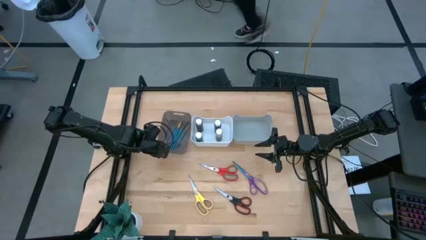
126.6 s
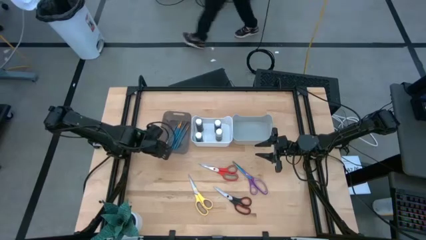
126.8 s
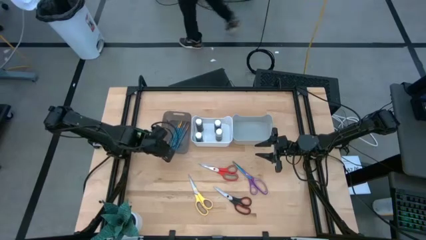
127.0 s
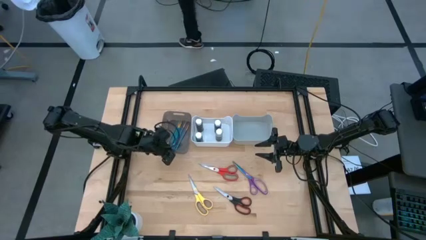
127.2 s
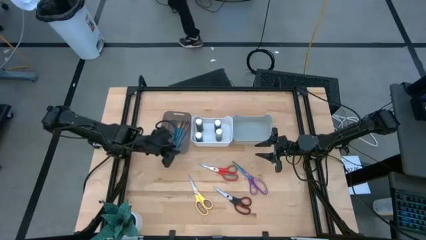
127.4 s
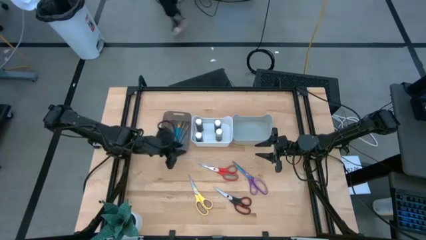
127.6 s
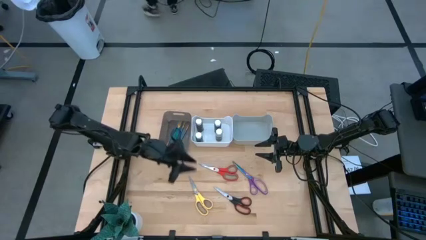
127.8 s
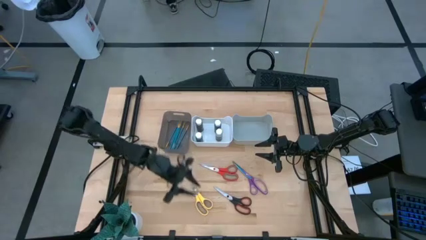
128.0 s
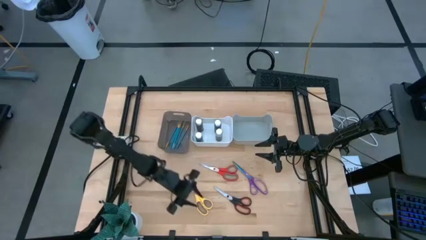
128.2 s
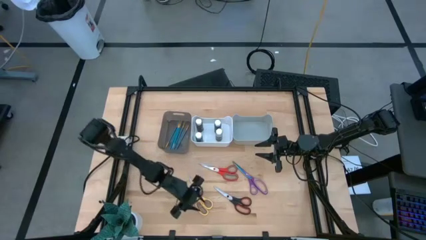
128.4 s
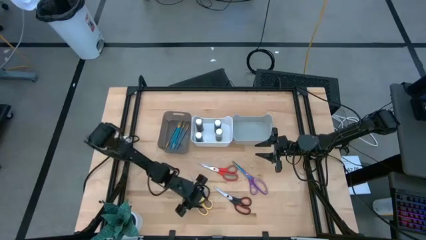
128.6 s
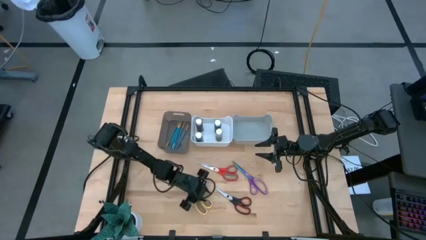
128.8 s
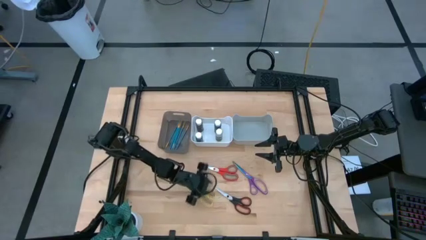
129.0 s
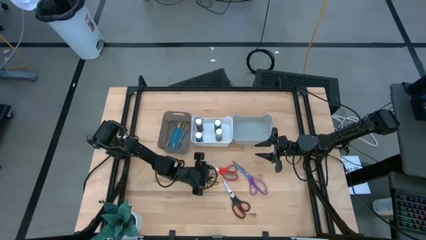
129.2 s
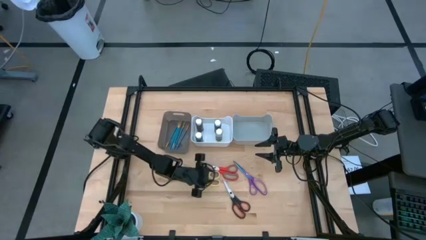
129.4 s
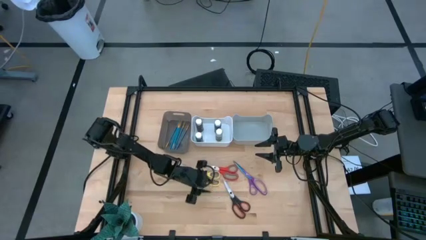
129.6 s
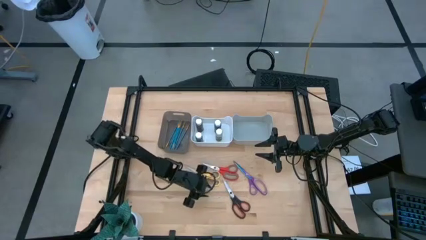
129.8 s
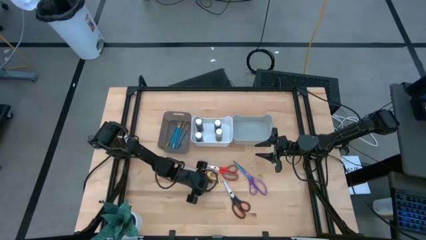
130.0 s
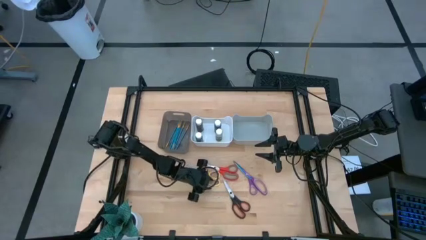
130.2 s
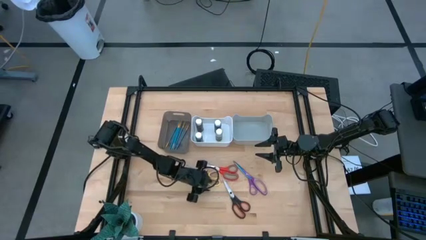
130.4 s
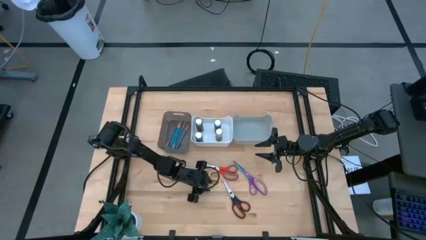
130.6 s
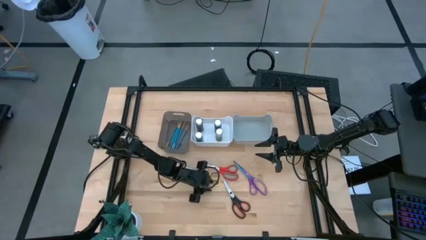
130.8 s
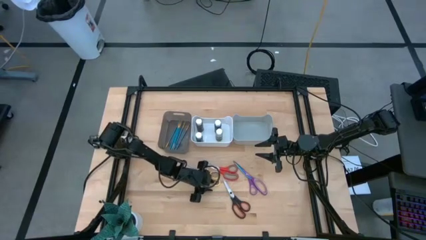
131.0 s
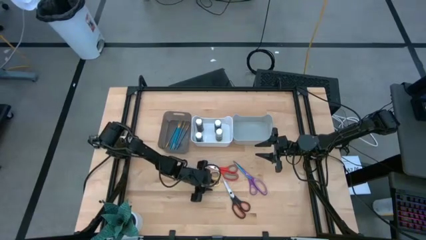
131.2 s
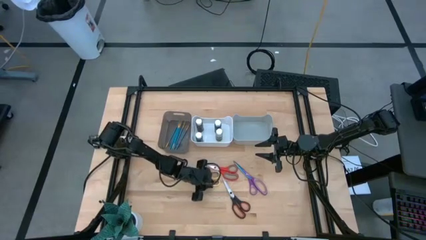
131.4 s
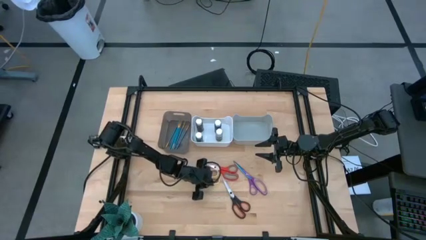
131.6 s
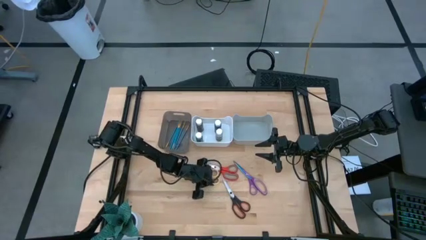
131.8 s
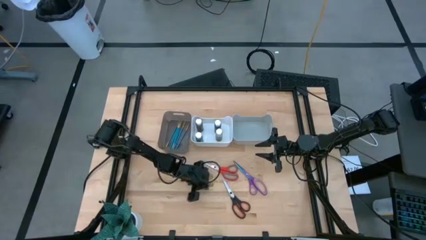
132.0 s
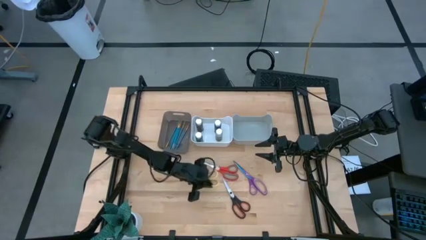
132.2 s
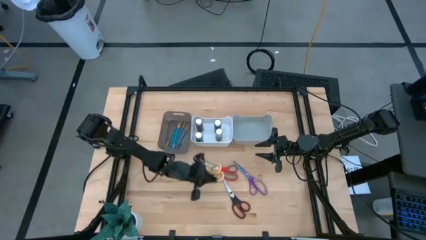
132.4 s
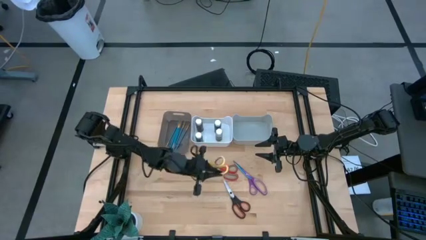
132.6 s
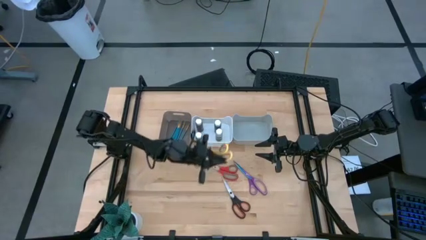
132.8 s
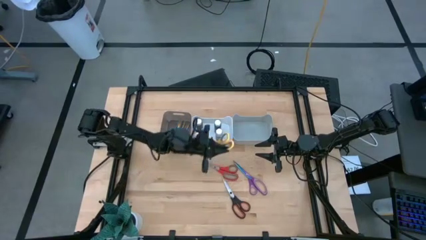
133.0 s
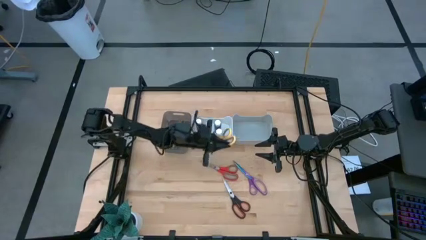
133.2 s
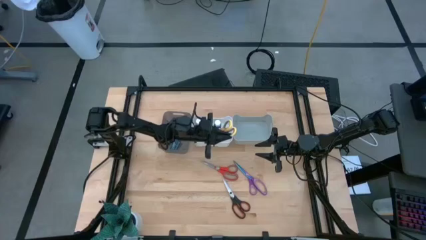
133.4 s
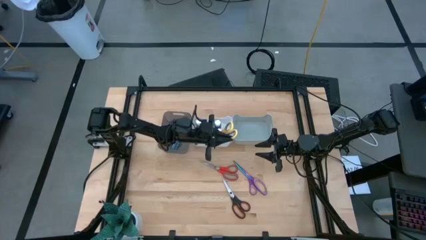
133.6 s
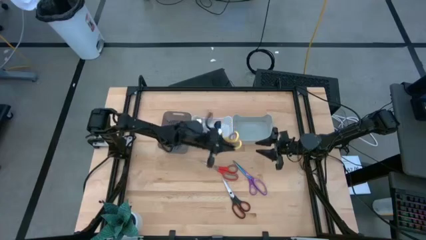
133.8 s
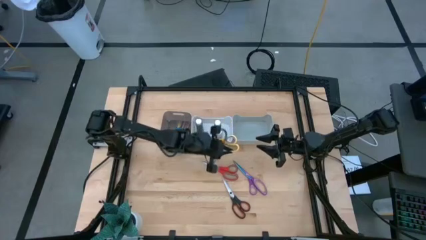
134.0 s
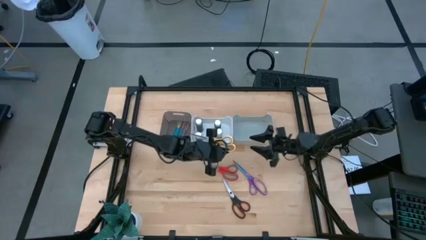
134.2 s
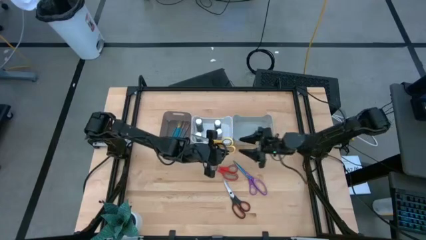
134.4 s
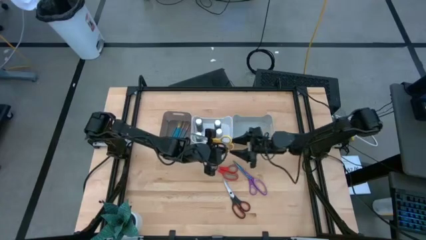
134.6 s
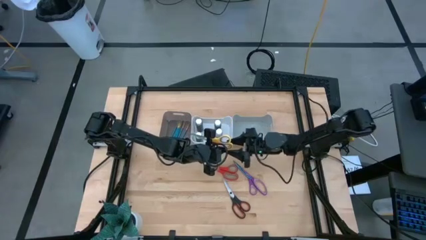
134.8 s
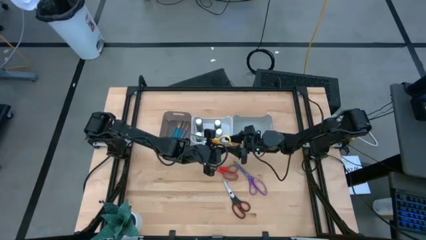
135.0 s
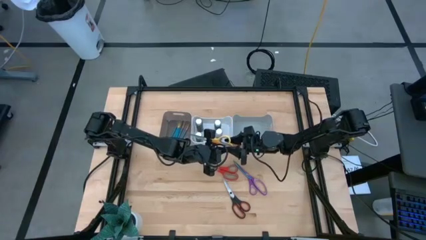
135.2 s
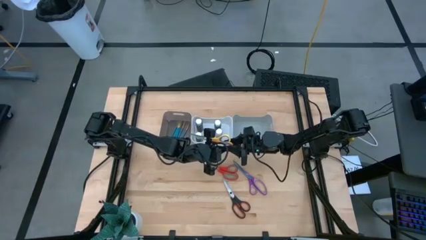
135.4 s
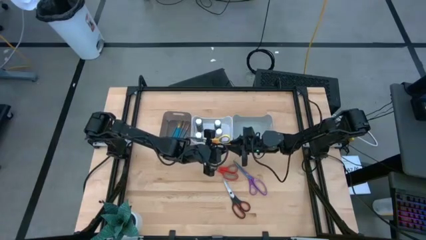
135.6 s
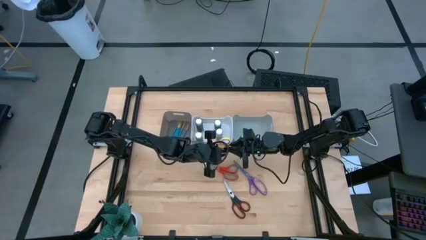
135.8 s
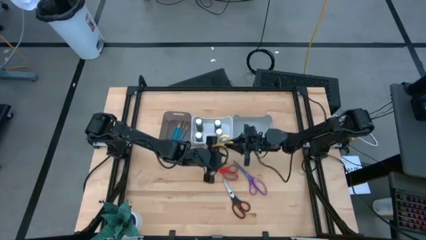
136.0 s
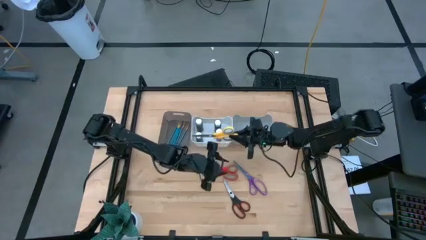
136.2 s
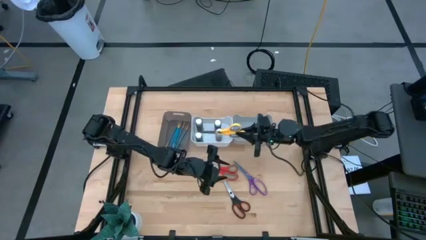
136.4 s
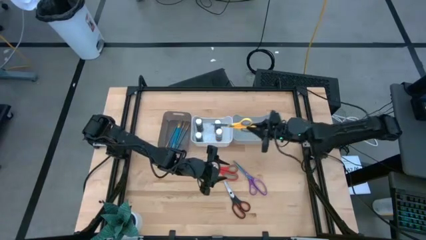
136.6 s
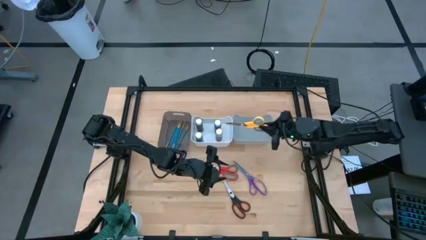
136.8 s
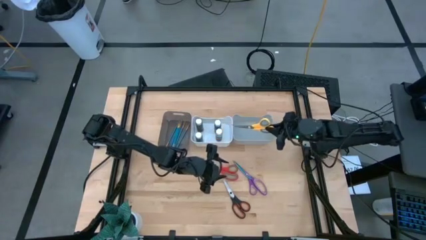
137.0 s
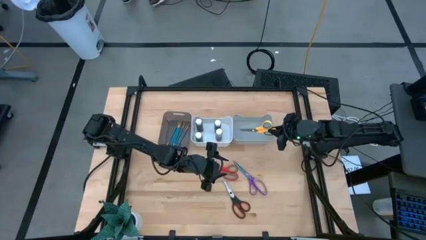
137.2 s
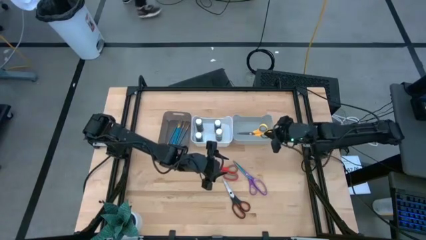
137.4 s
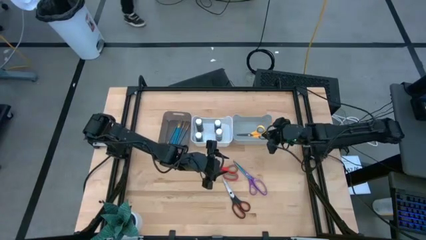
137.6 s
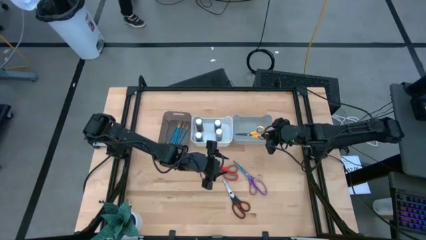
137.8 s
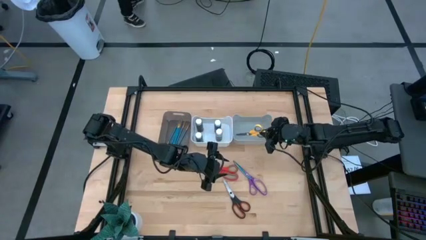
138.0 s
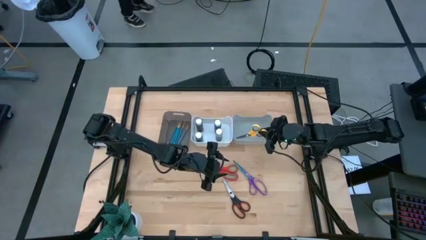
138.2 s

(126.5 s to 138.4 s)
Task: Pick & Place Paint Supplies
Put the yellow scissors into the gray bin

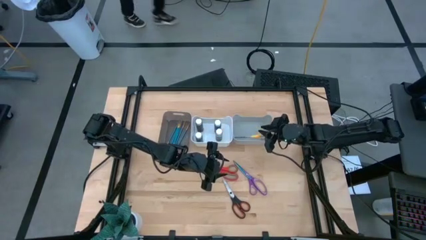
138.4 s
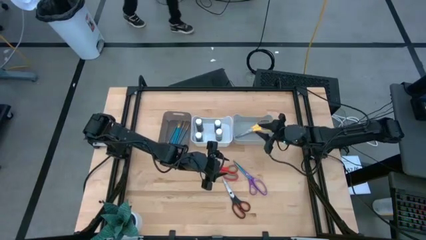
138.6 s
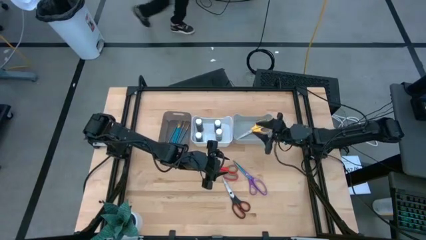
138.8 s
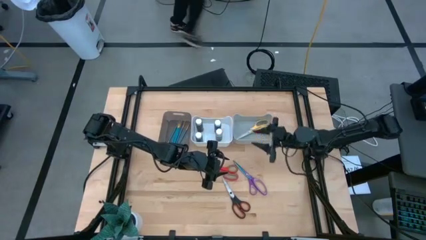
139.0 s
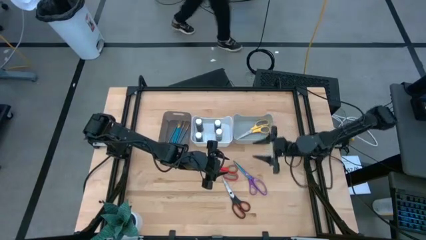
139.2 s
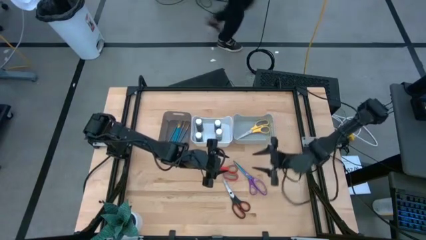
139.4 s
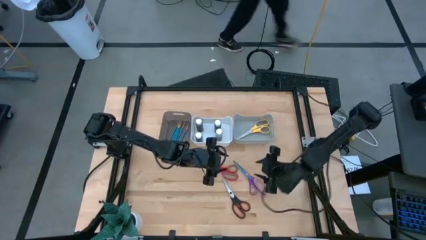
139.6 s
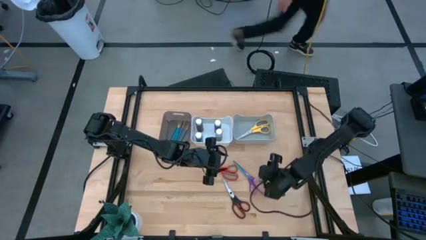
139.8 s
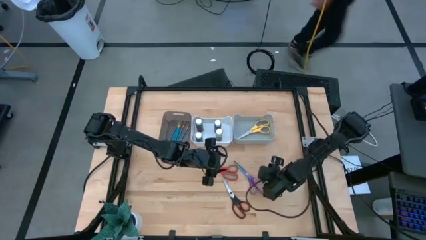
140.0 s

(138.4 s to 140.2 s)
Put the purple scissors into the gray bin

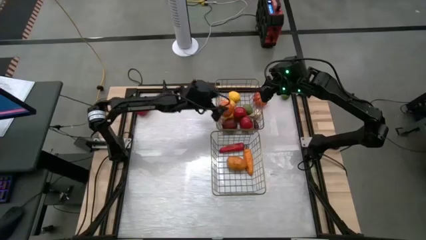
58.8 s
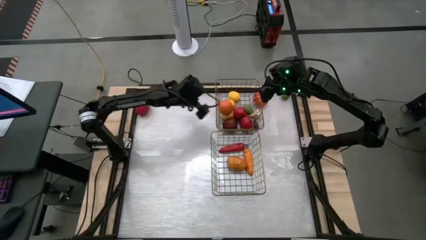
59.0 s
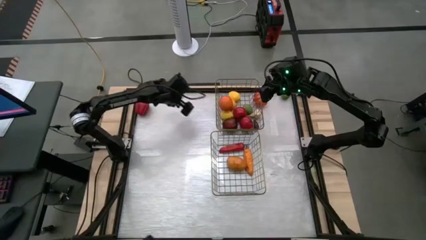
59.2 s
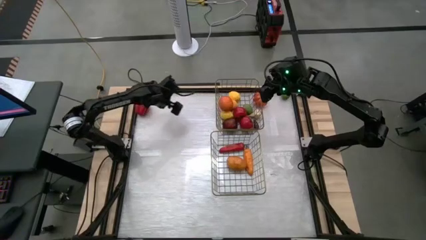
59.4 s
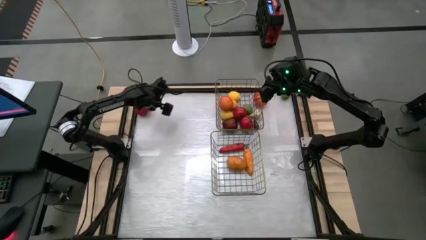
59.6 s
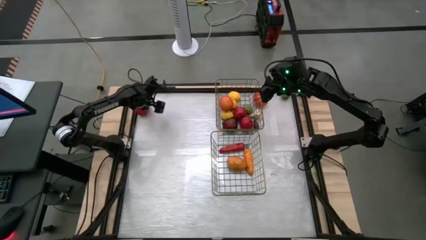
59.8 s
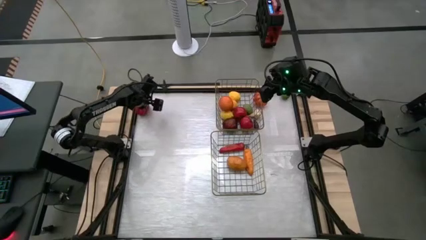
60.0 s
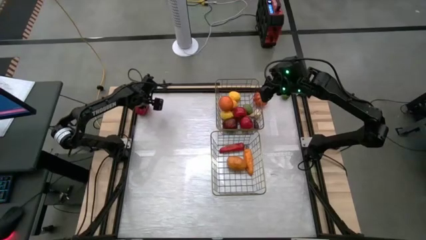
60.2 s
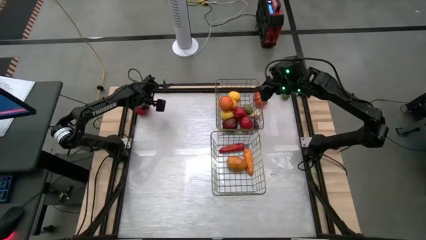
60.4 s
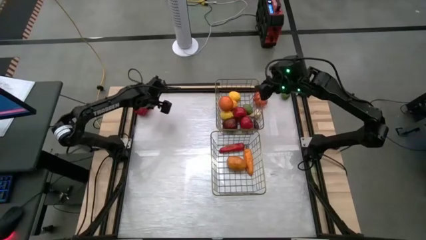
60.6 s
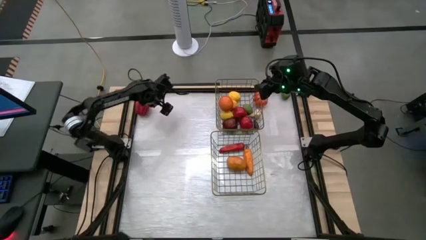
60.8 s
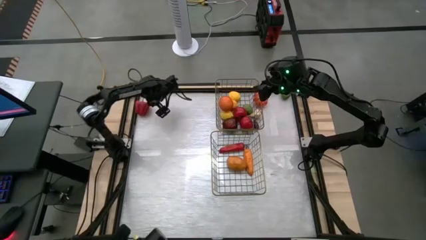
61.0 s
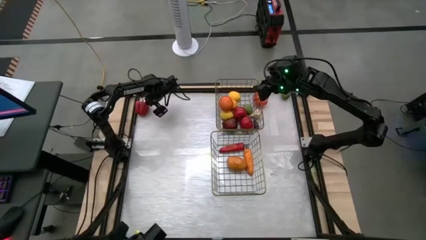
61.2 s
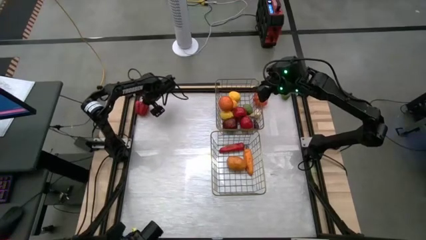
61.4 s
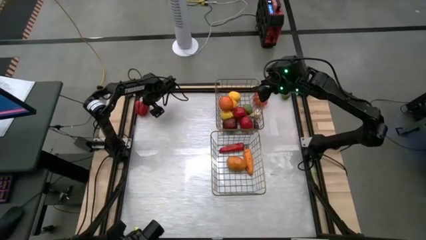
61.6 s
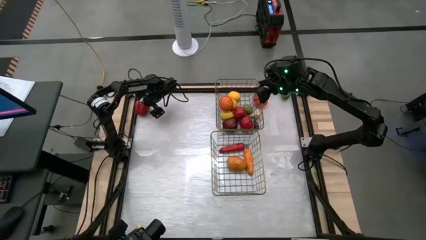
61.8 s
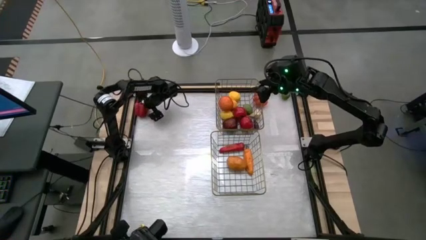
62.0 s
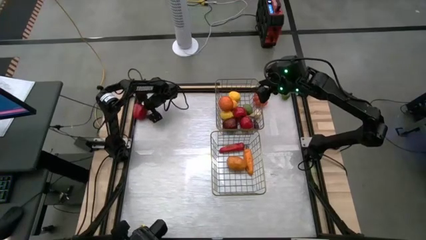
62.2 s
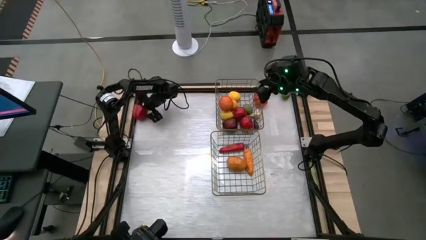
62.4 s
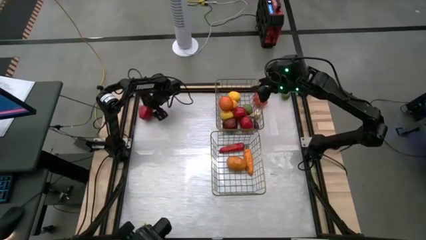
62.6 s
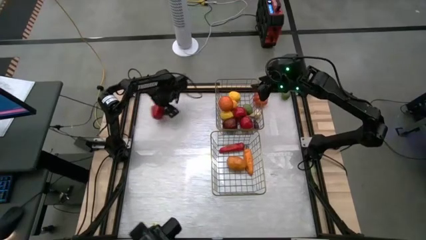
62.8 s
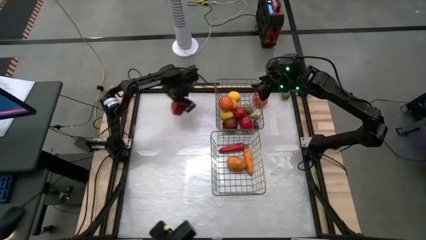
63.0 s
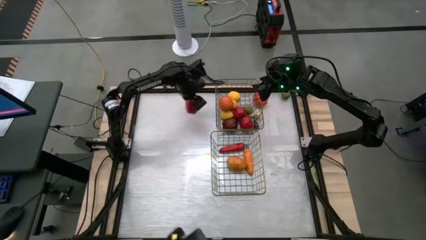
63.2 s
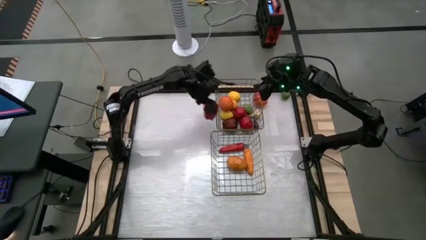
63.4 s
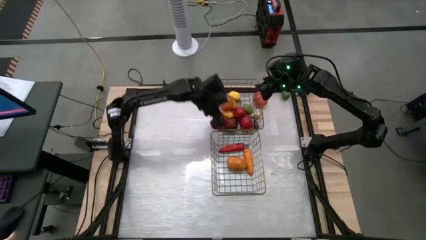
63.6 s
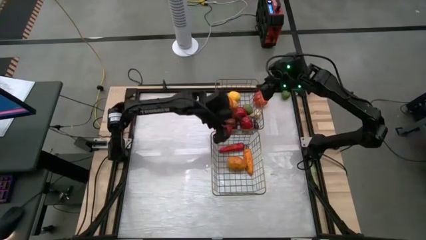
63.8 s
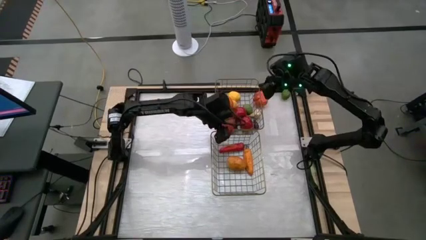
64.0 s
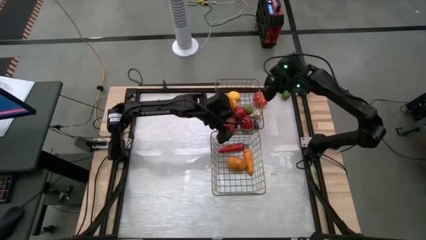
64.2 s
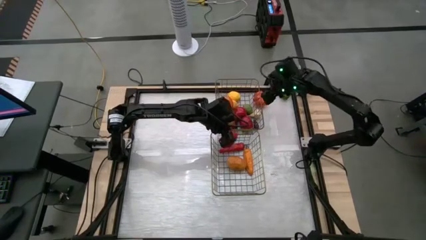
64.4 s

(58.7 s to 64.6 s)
Task: Sort produce into baskets
Put the red bell pepper into the bottom wire basket
